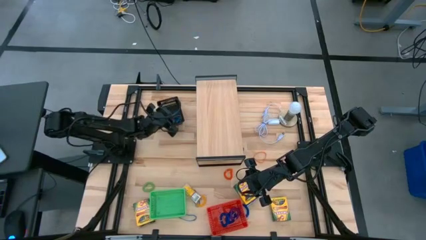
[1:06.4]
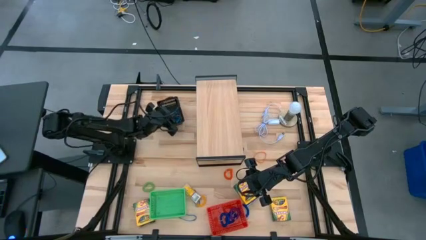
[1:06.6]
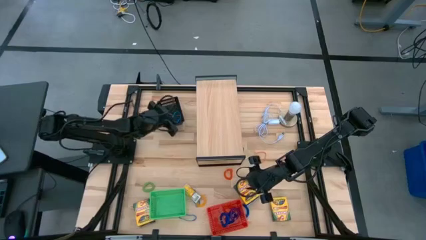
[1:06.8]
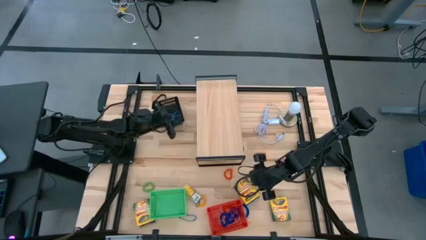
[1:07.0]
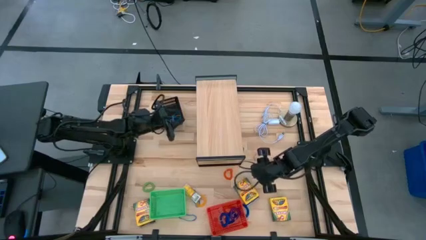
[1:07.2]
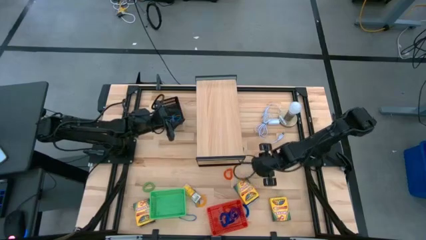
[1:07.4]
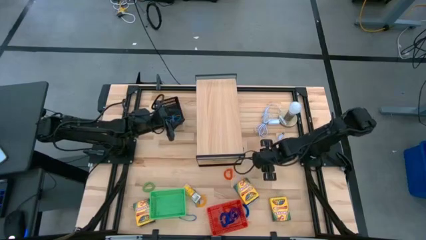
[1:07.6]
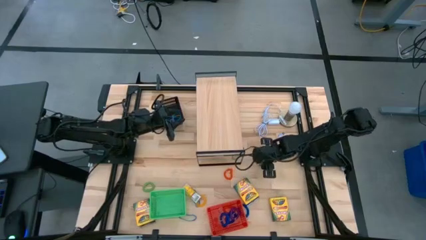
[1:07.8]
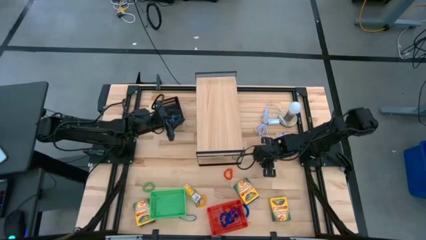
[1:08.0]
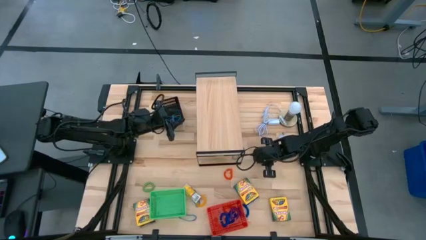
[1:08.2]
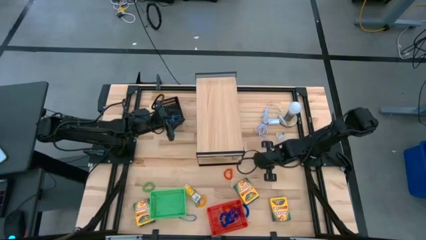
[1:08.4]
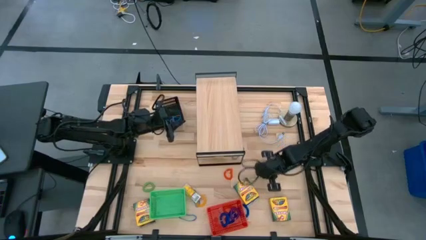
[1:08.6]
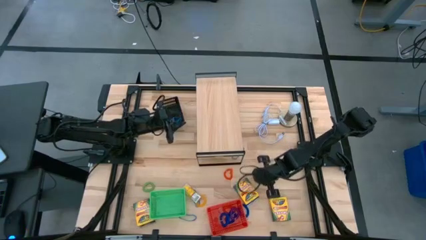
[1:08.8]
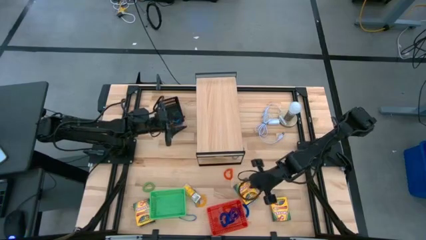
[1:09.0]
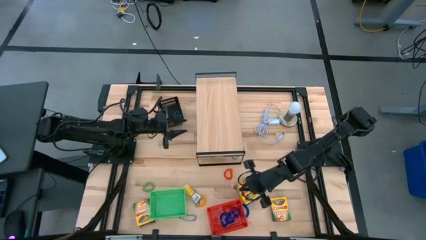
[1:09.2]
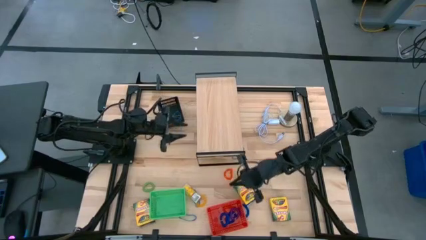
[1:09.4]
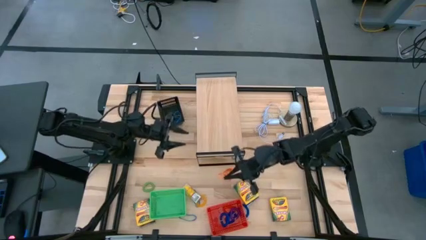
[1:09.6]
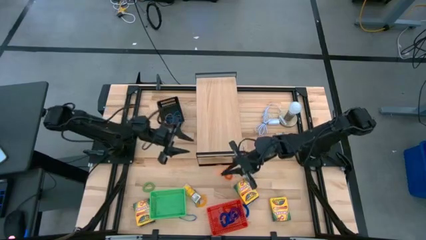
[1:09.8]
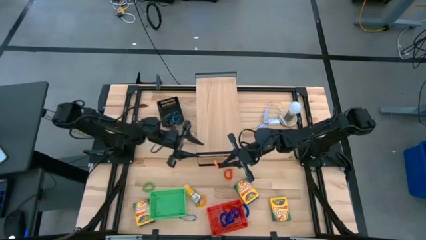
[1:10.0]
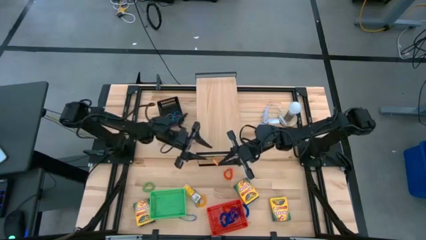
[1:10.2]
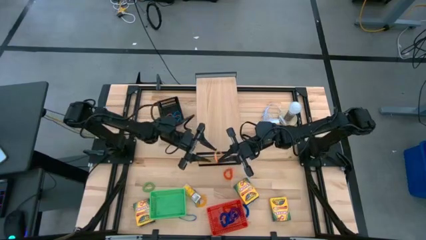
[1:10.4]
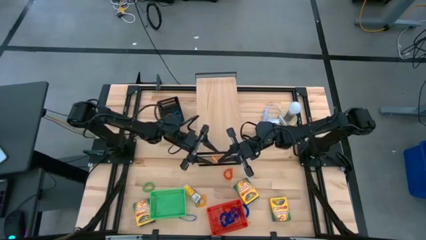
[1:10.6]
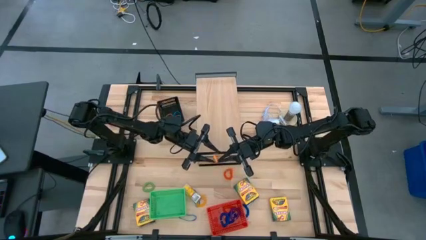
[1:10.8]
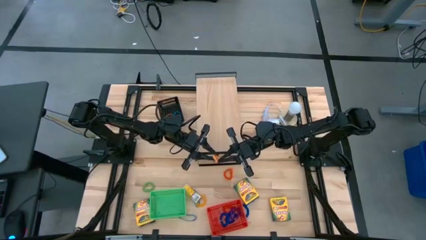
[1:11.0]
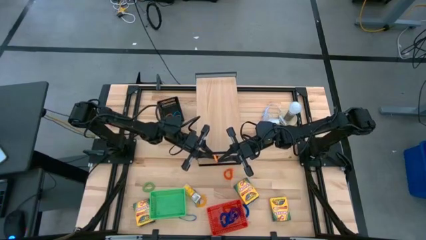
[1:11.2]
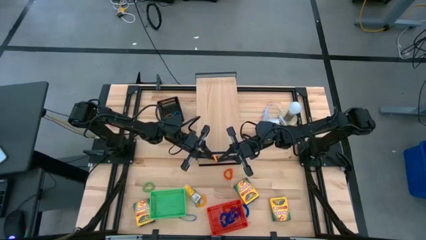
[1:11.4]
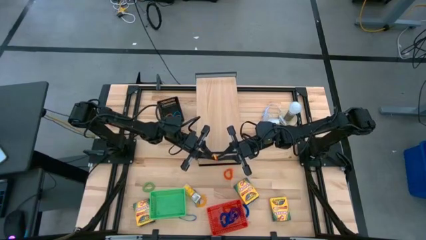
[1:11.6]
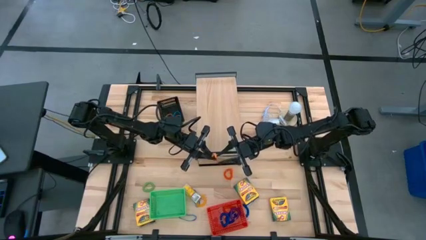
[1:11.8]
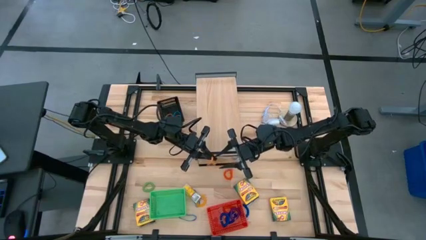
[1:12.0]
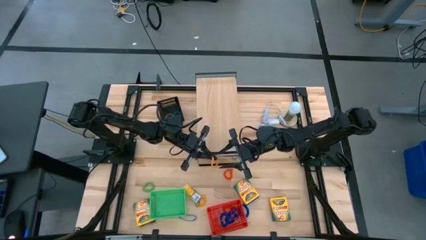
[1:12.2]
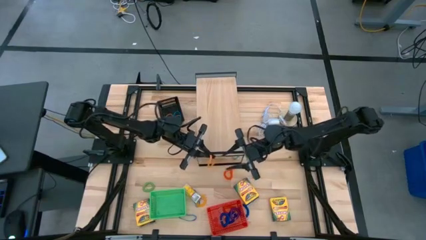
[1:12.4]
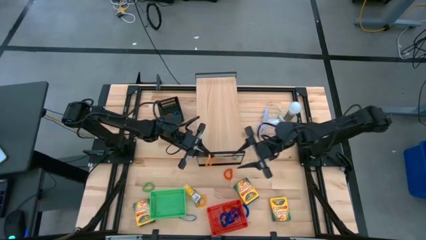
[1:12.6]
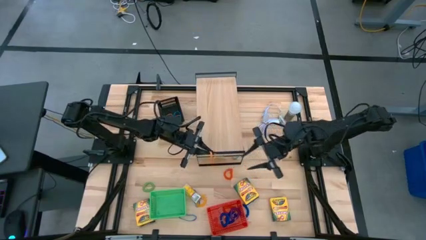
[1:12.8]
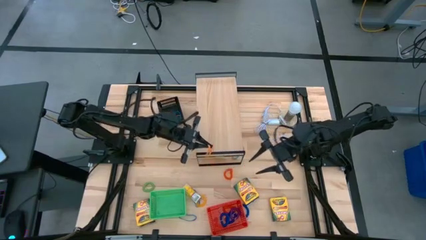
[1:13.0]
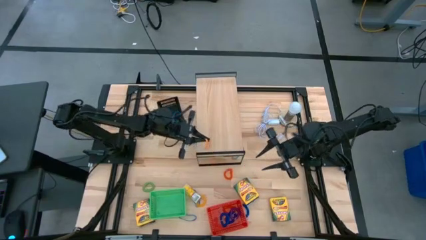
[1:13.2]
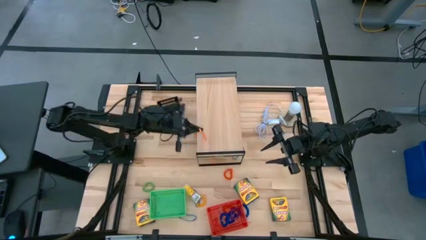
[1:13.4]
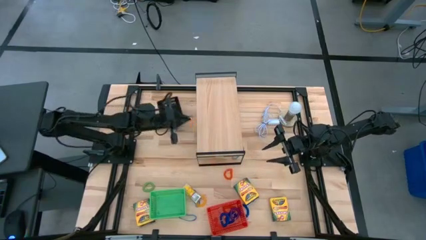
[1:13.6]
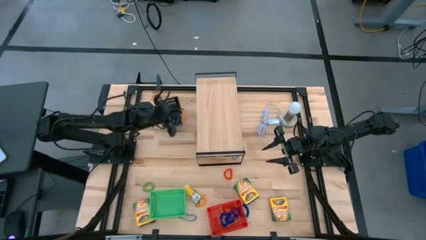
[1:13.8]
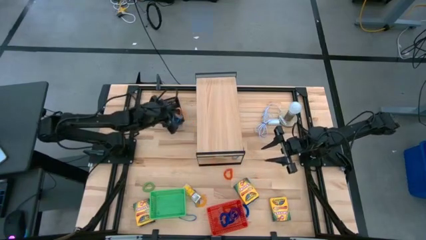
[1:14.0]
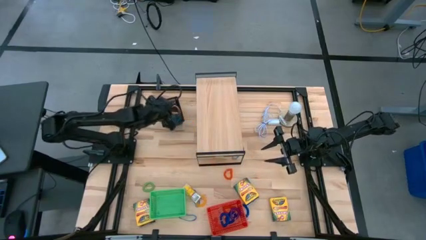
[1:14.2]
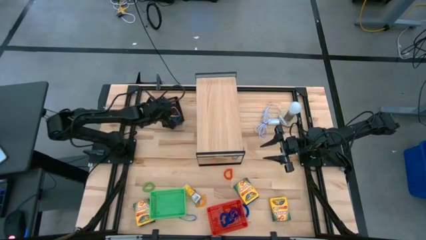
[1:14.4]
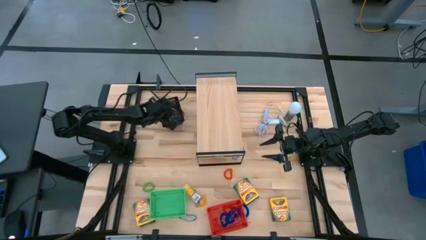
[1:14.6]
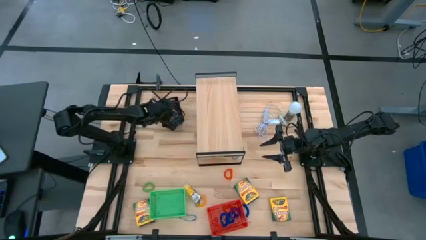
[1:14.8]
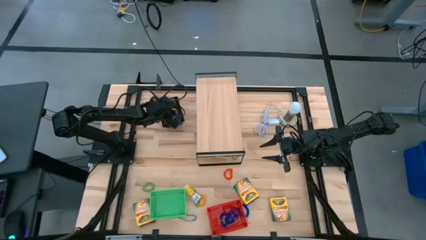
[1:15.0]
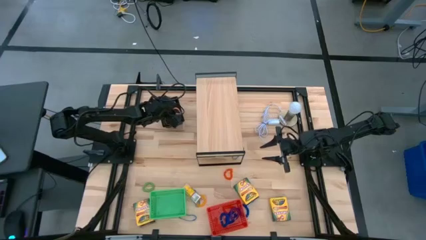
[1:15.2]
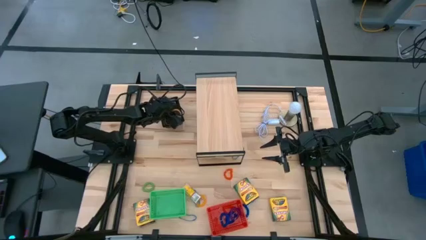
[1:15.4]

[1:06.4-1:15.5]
Task: Pick & Place Office Desk Supplies
Put the orange rubber band into the black basket

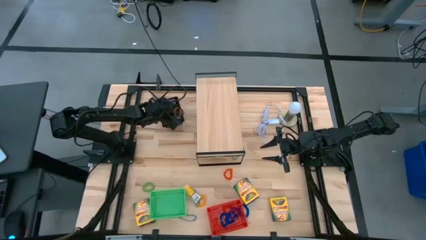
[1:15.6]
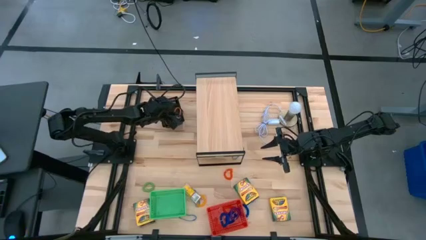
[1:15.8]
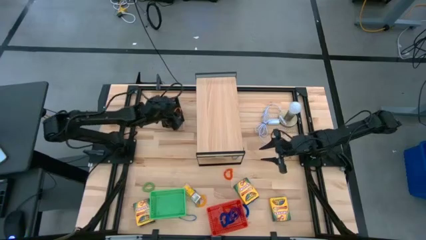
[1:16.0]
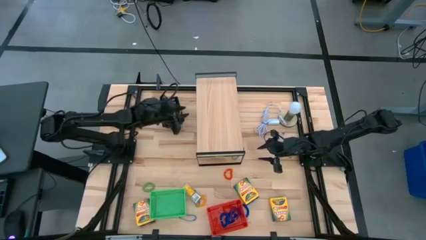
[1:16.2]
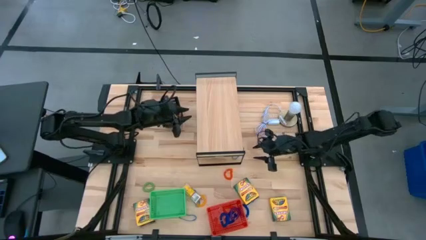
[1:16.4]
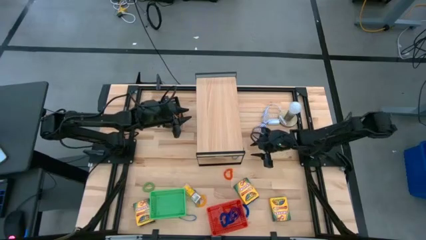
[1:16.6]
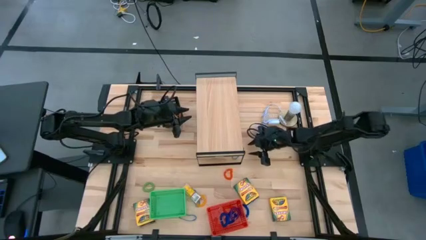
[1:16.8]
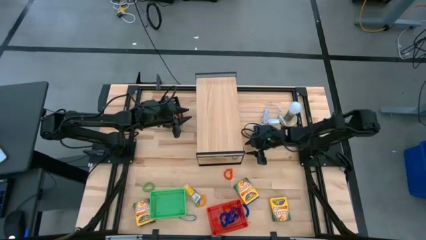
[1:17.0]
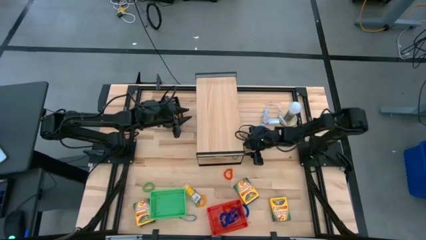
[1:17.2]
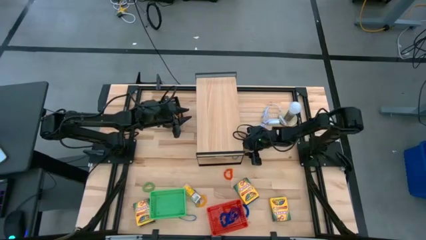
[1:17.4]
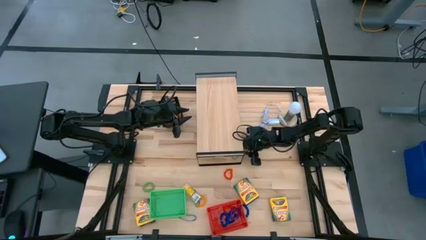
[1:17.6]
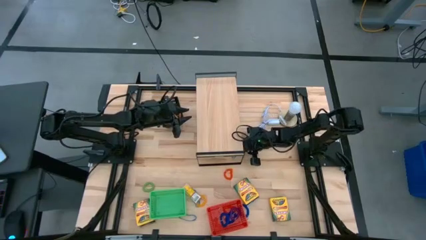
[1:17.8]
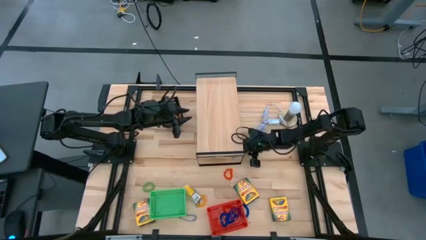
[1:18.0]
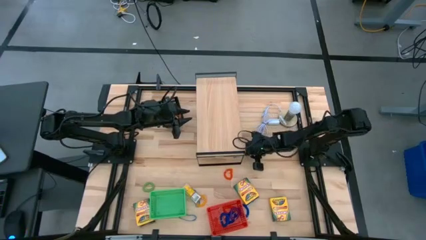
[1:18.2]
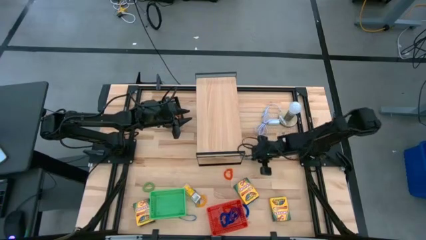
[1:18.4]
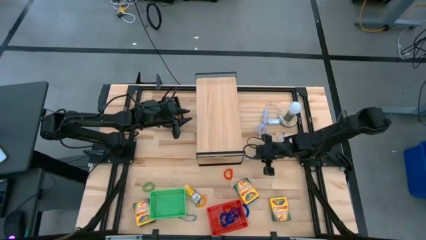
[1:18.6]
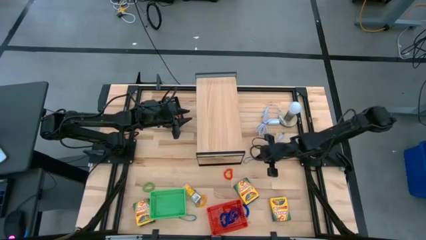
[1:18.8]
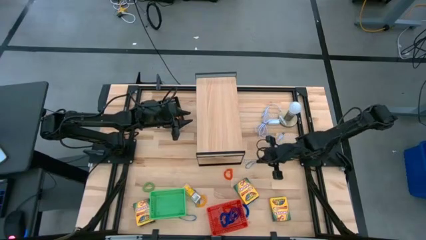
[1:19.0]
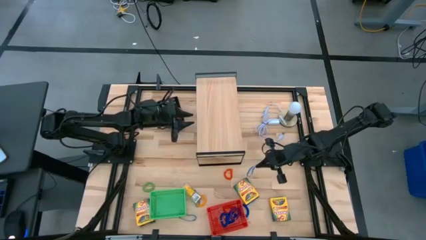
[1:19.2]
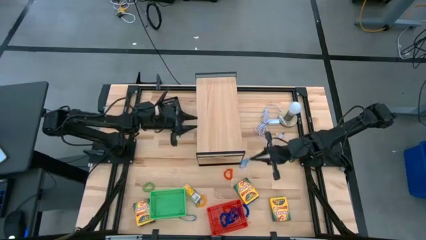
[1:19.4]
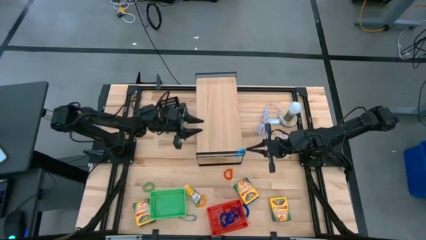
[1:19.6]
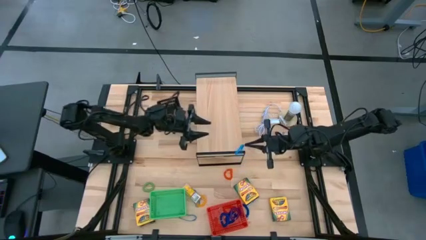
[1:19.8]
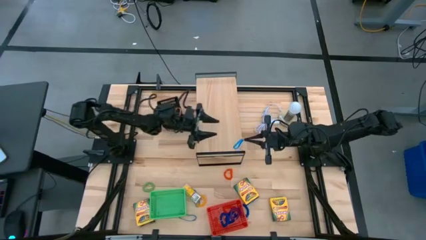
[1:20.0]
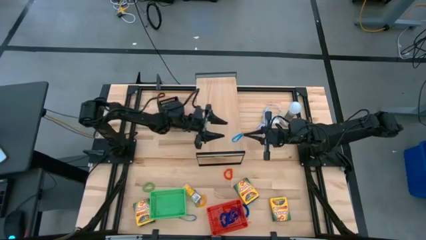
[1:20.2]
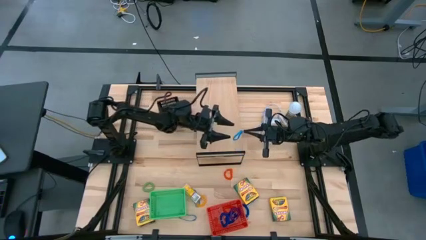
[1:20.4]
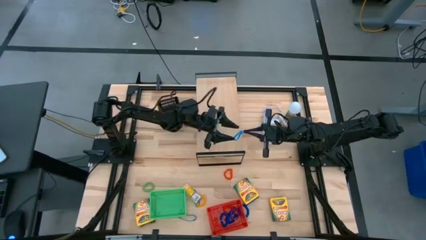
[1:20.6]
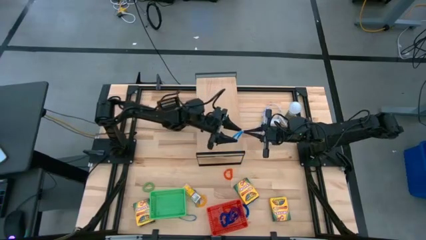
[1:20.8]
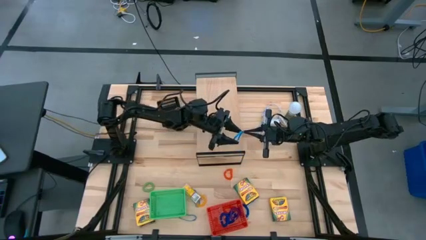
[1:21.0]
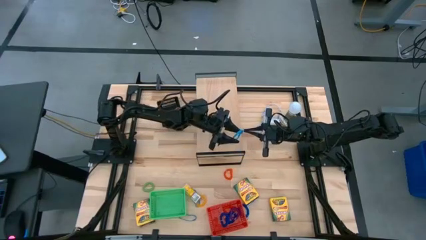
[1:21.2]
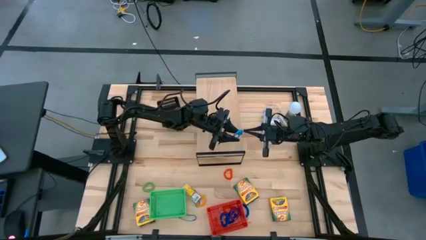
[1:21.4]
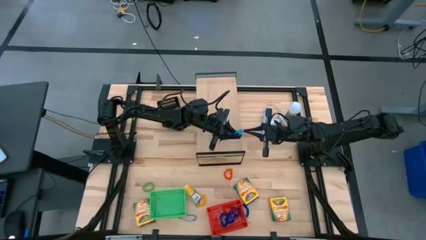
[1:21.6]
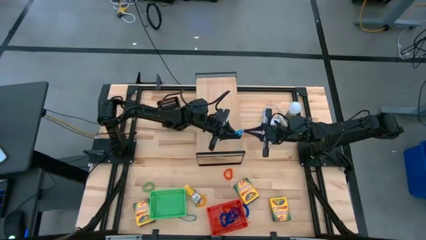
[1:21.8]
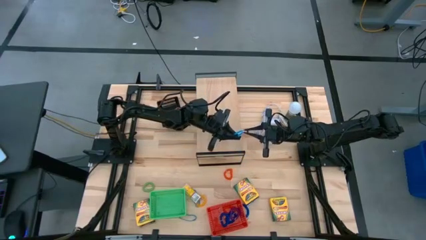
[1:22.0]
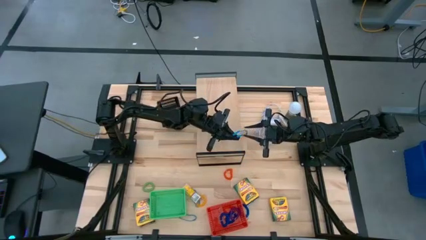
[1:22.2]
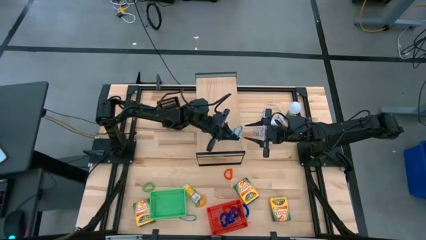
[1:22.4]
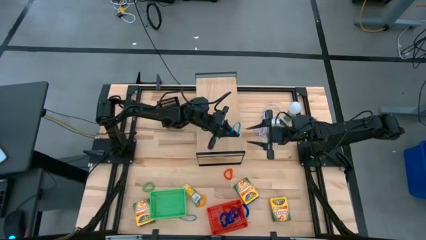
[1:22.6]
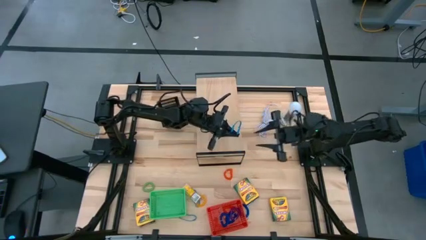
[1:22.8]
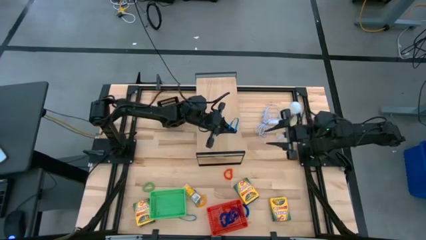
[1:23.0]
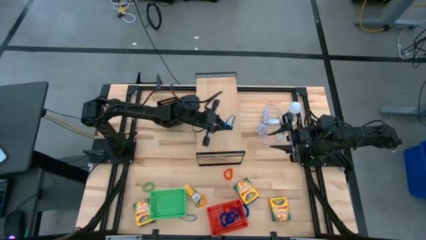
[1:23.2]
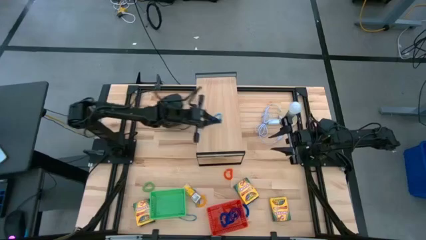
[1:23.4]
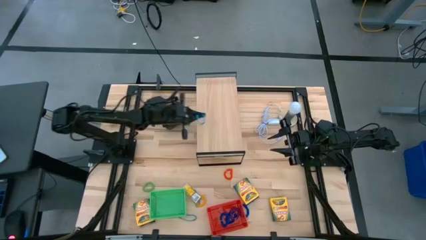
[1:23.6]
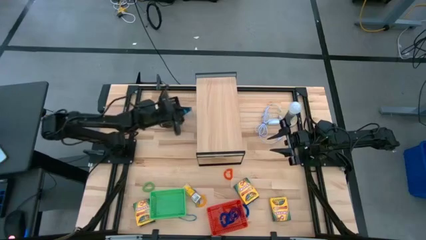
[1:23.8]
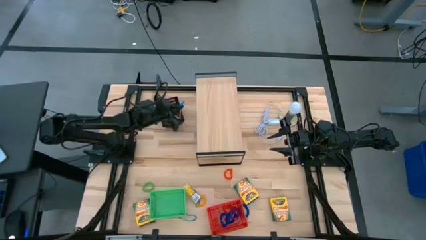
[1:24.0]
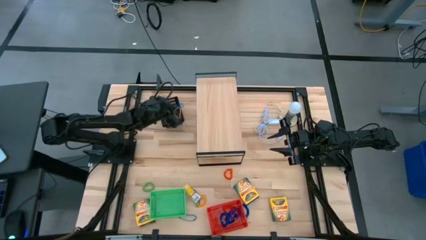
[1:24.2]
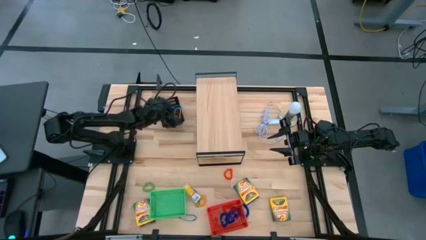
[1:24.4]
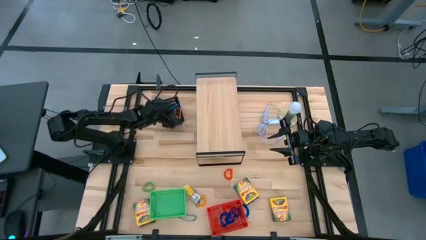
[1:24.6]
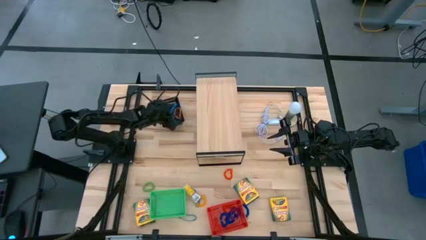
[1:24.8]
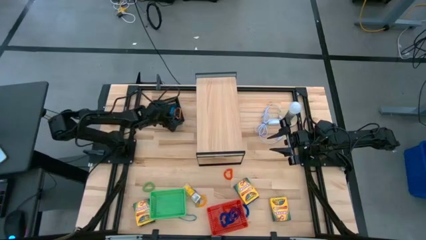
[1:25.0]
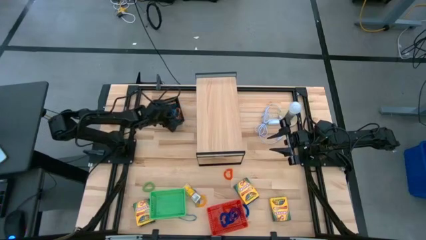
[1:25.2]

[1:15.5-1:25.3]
Put the blue rubber band into the black basket
